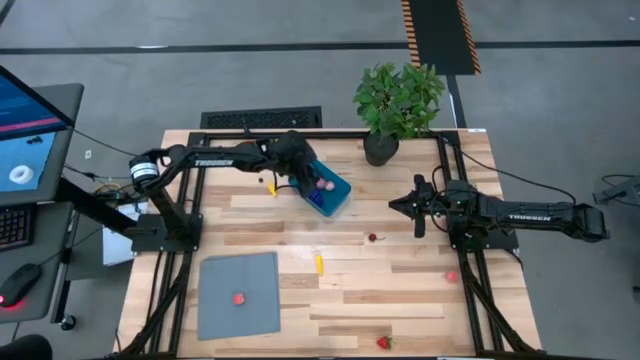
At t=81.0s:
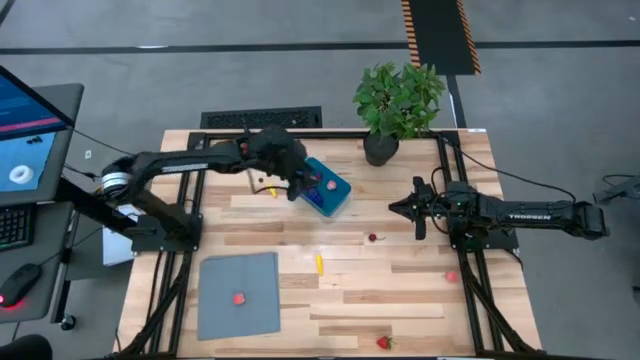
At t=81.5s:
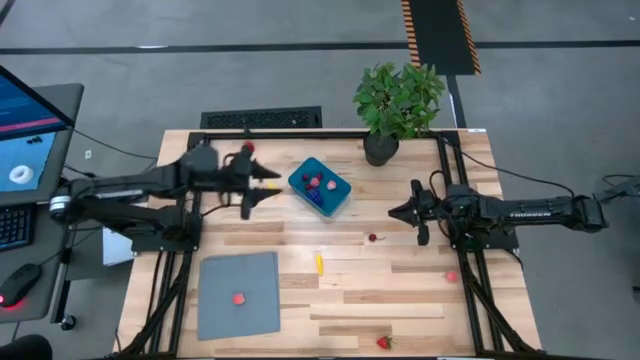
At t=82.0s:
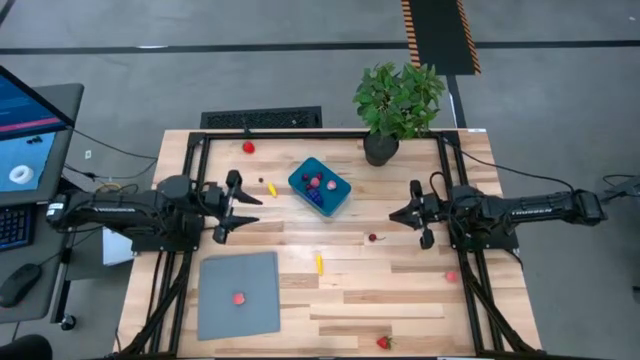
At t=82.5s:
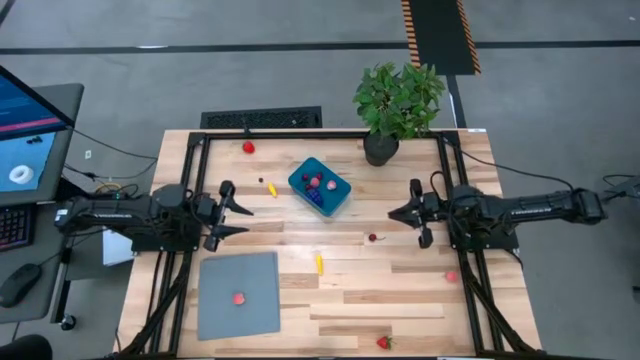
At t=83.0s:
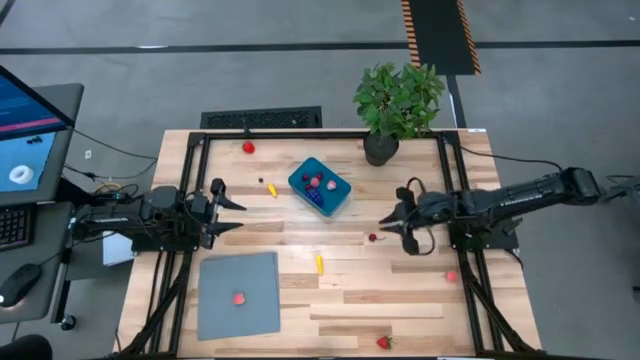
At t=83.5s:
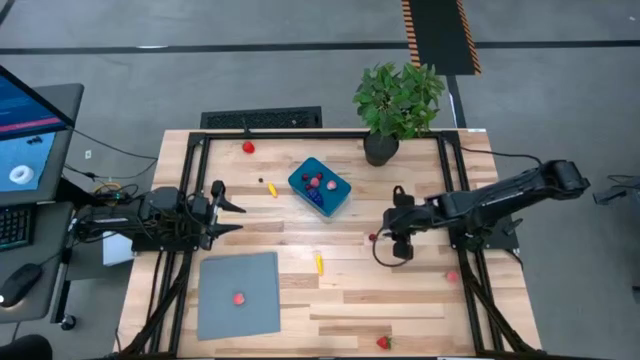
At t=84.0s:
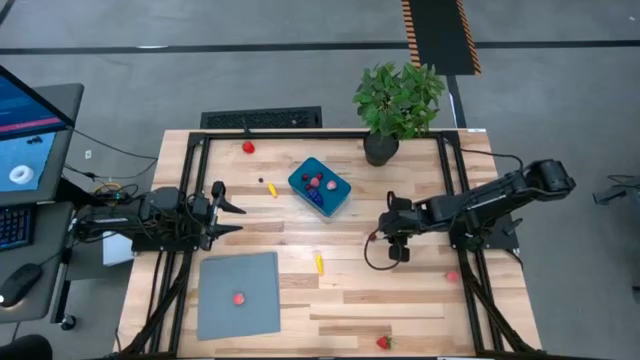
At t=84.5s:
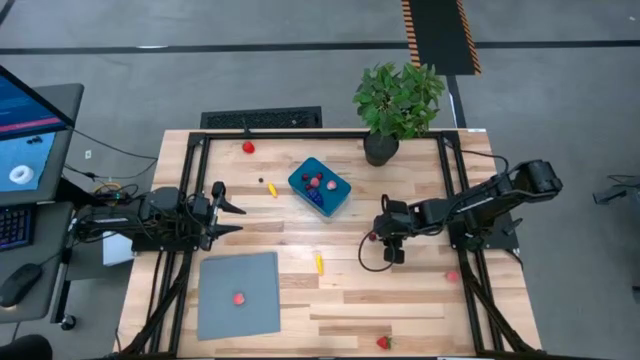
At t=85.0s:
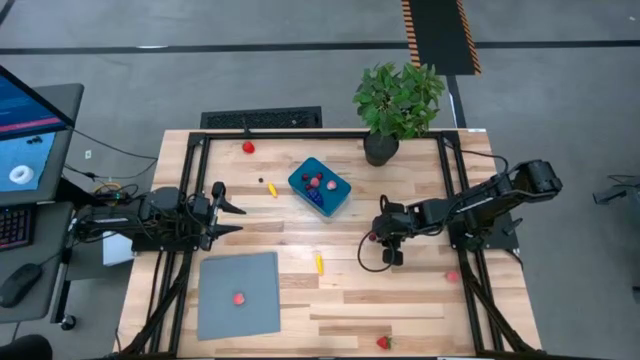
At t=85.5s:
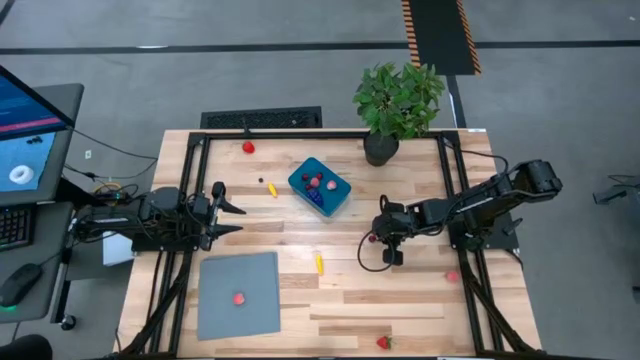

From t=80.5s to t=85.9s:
Task: Pick and placing Produce into tupperware
Put the cherry into the container

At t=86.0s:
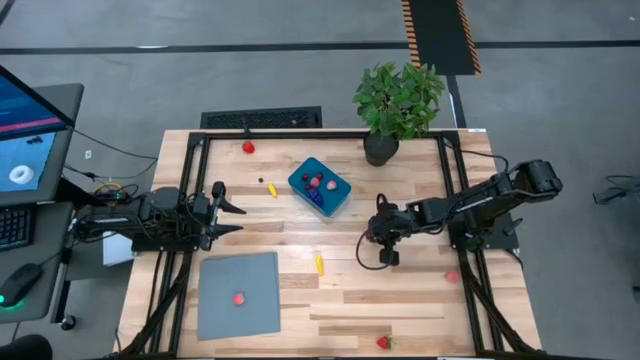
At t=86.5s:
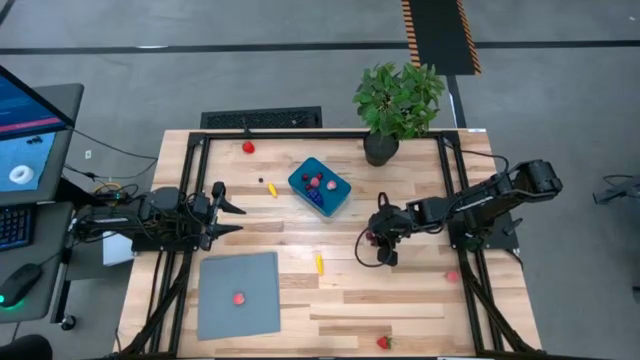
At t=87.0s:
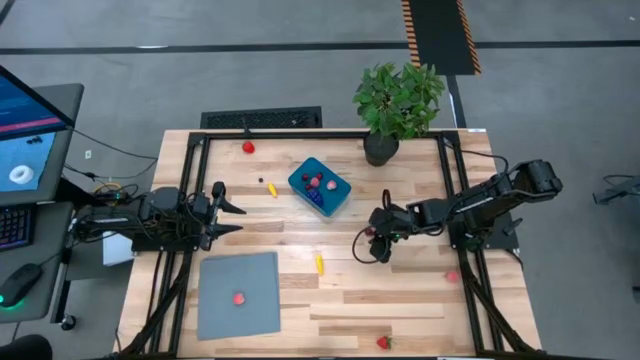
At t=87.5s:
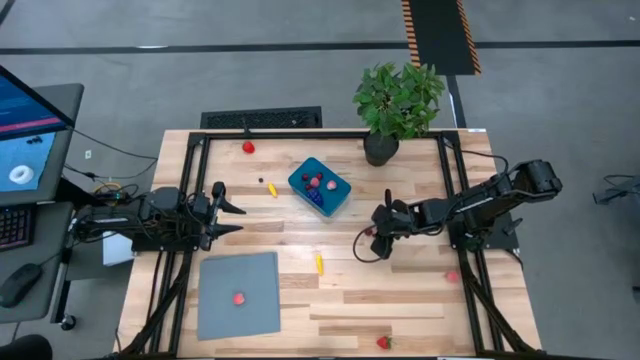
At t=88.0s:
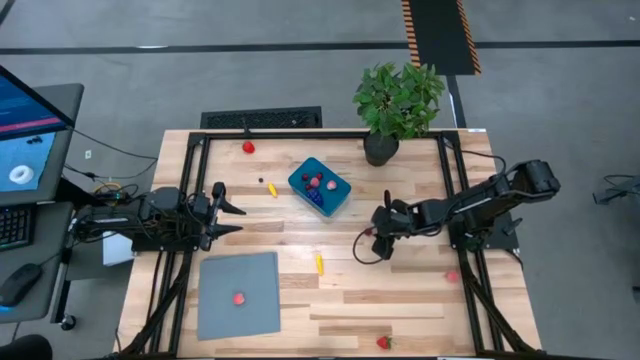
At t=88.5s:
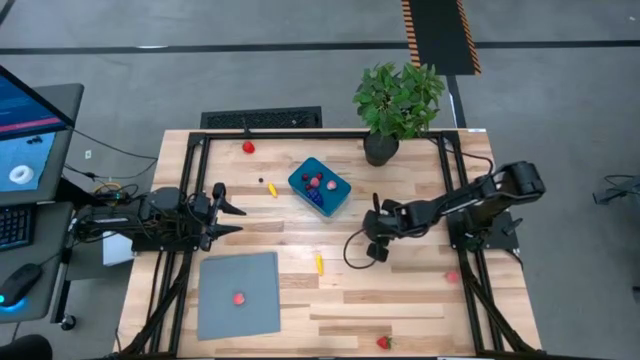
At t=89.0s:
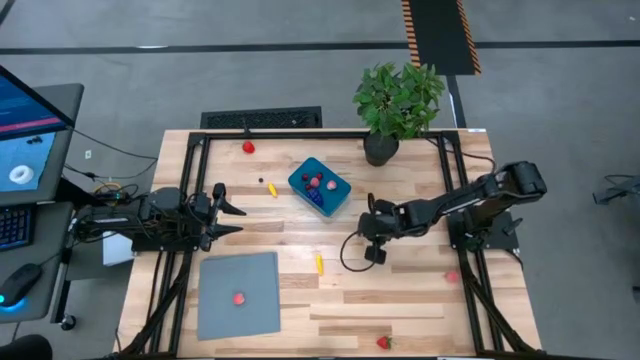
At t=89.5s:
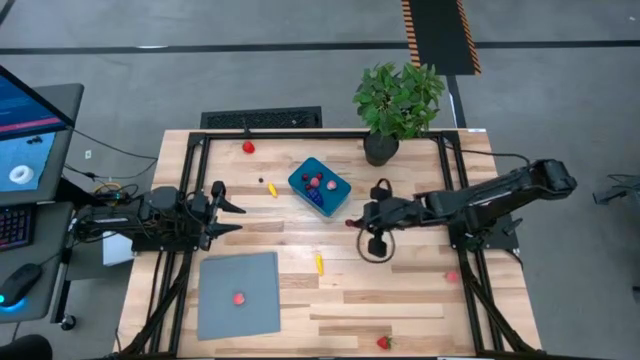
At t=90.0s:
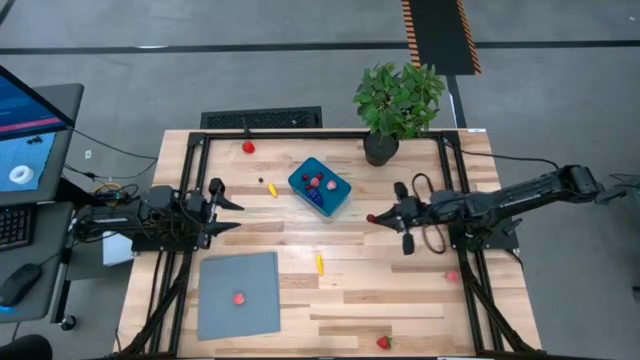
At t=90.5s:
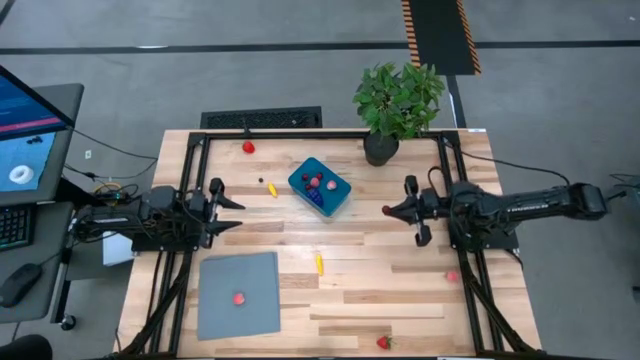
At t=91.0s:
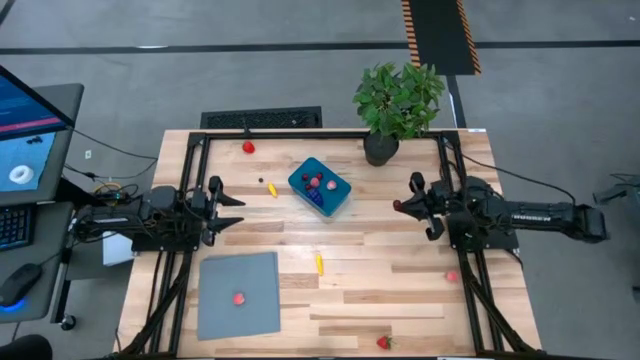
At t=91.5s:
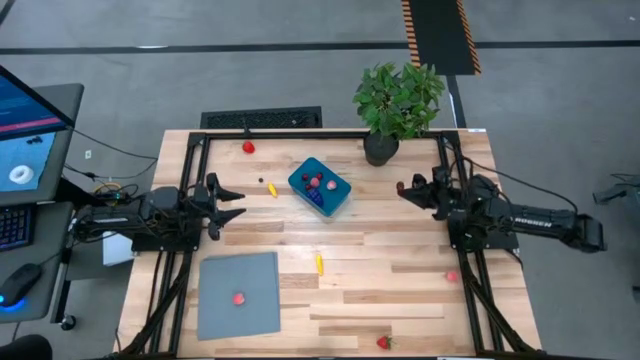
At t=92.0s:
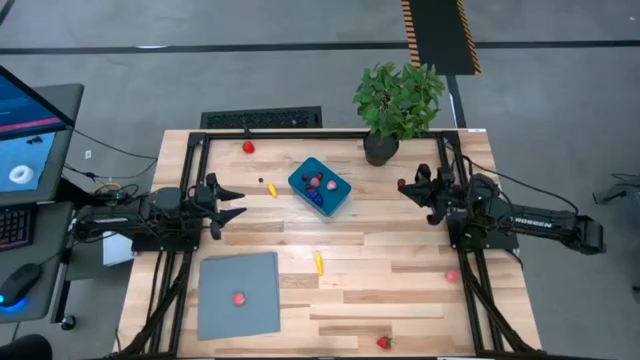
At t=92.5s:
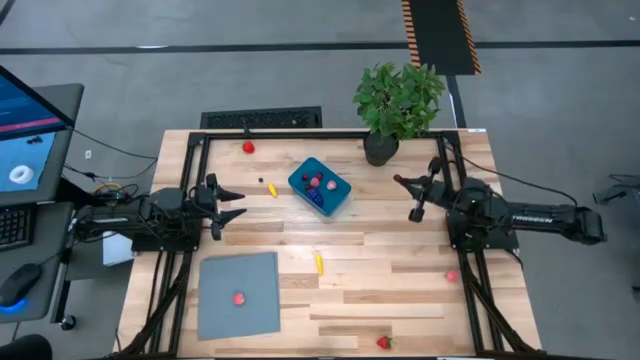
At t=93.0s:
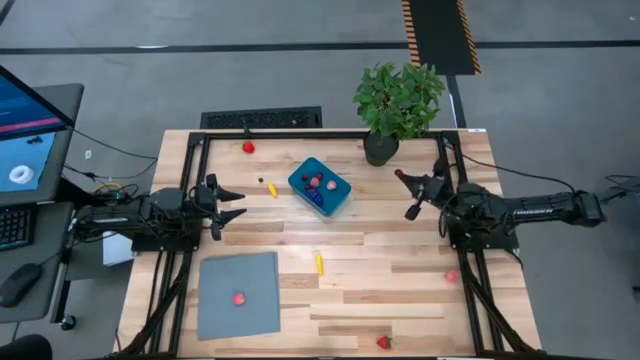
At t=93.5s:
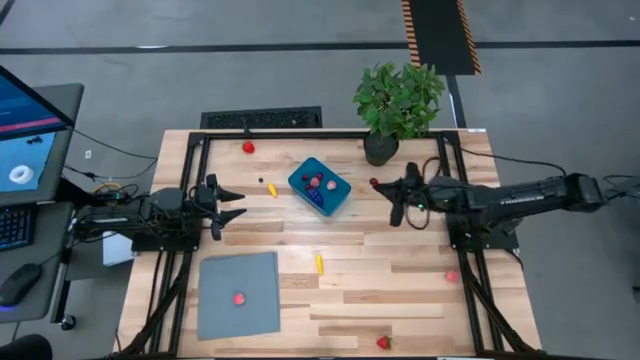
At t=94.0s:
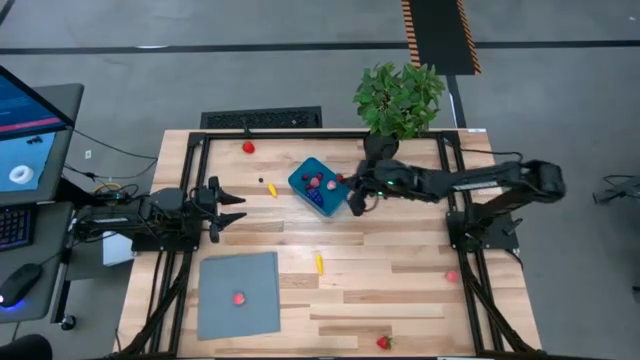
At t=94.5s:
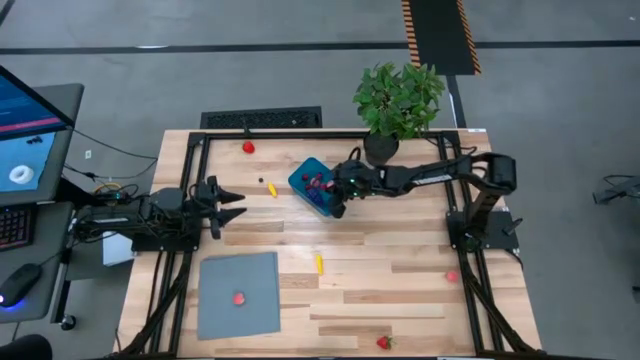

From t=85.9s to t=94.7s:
Put the cherry into the container

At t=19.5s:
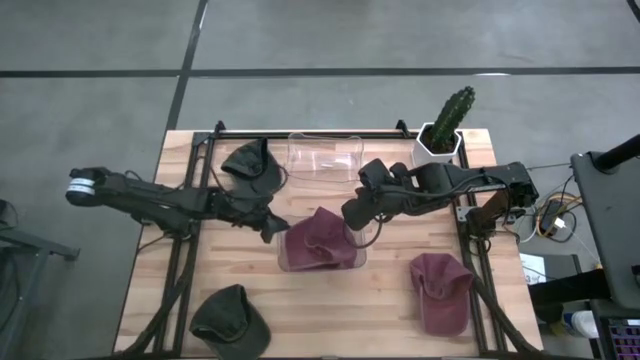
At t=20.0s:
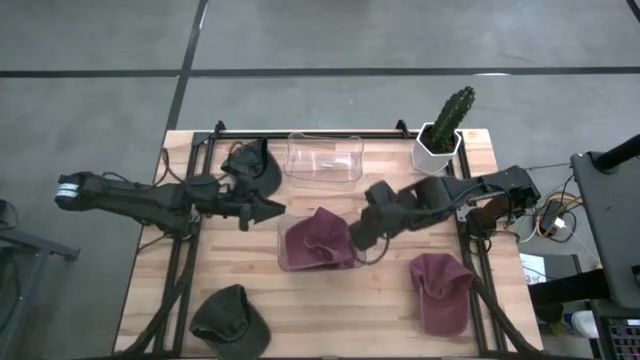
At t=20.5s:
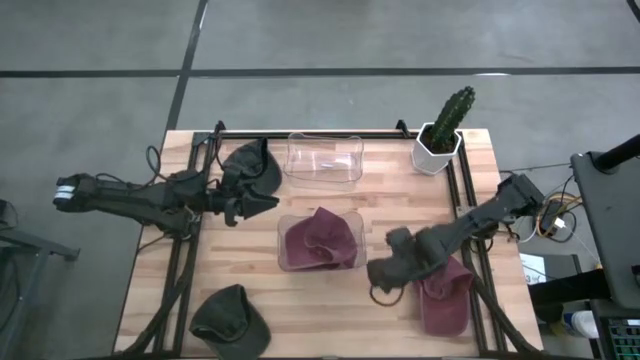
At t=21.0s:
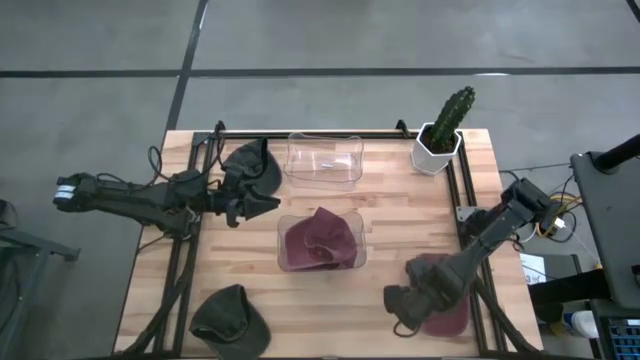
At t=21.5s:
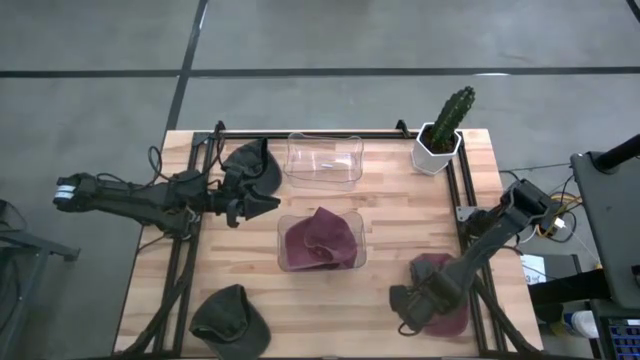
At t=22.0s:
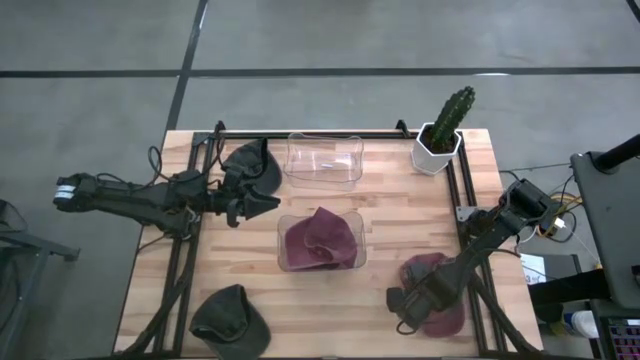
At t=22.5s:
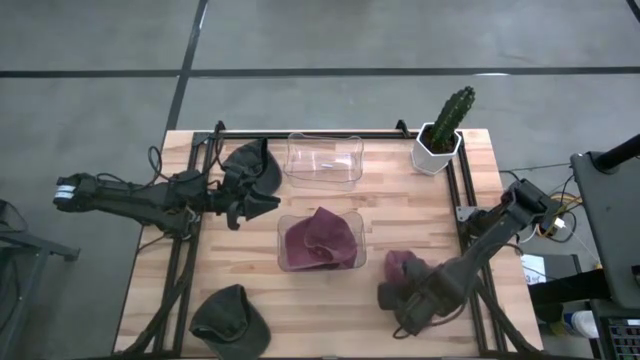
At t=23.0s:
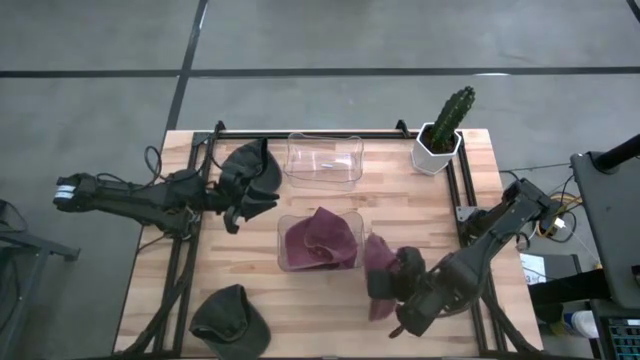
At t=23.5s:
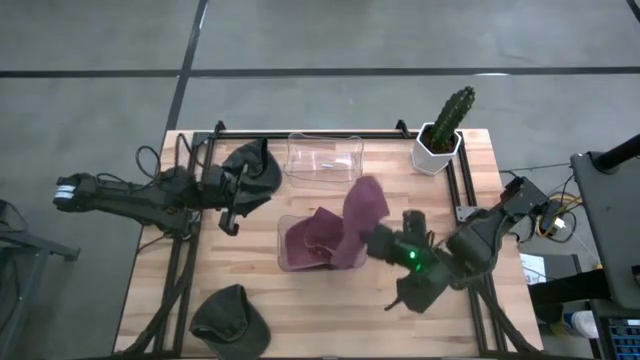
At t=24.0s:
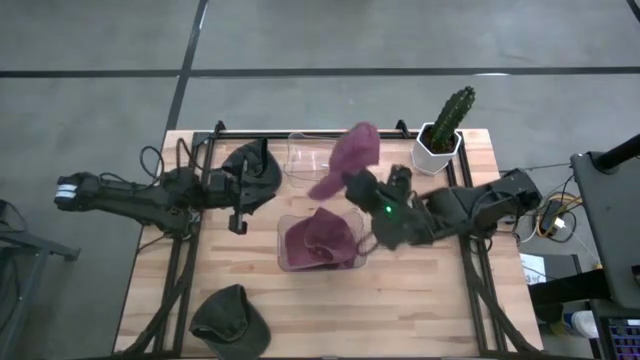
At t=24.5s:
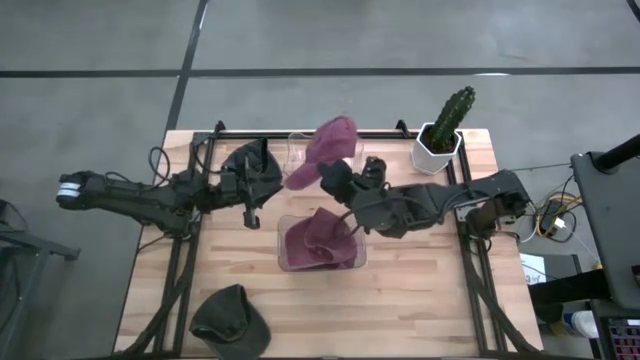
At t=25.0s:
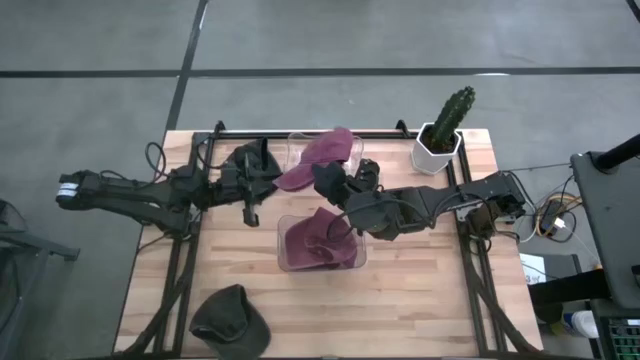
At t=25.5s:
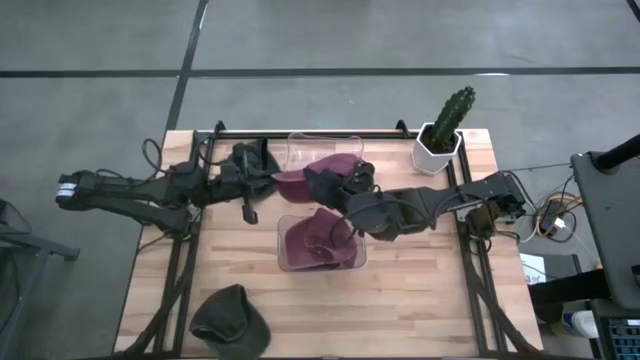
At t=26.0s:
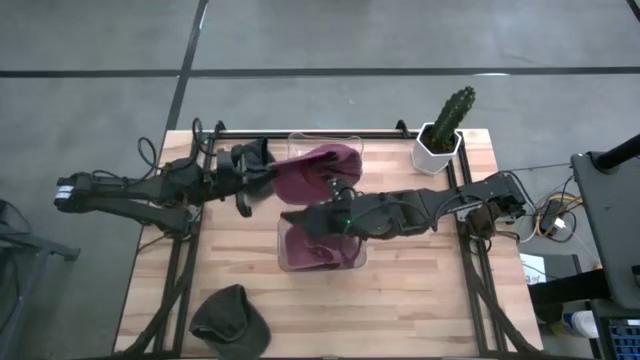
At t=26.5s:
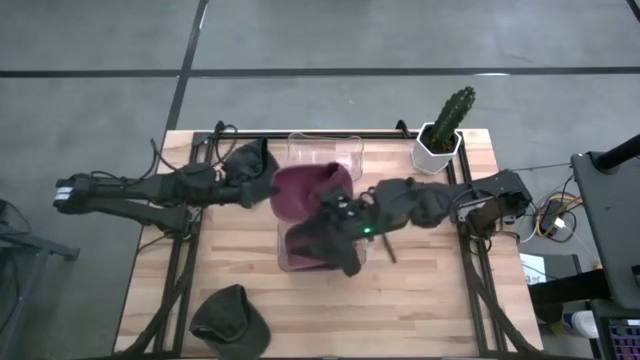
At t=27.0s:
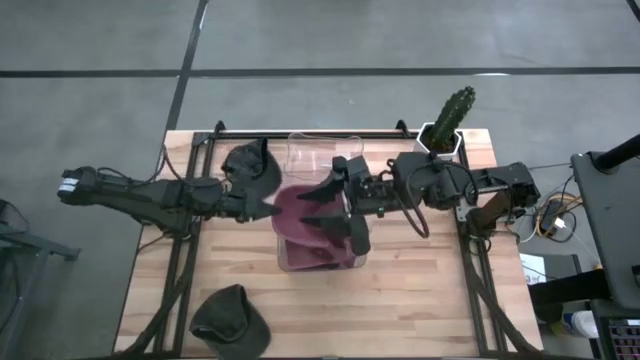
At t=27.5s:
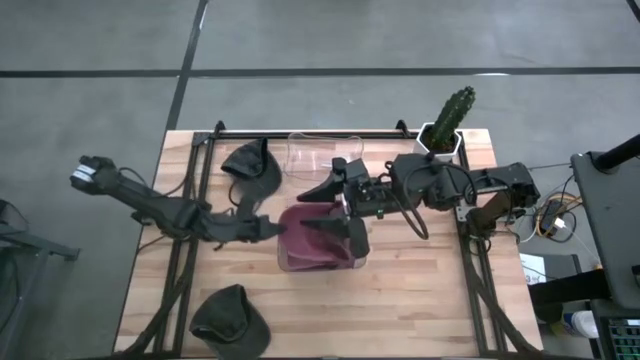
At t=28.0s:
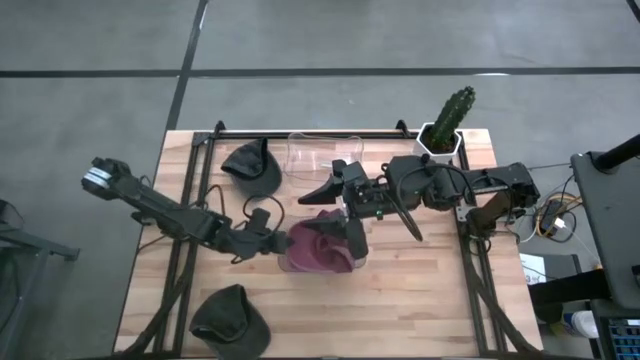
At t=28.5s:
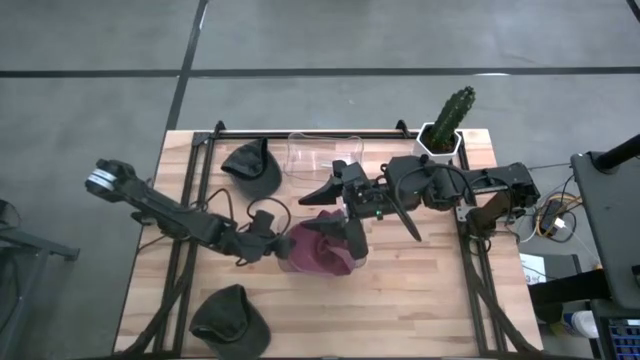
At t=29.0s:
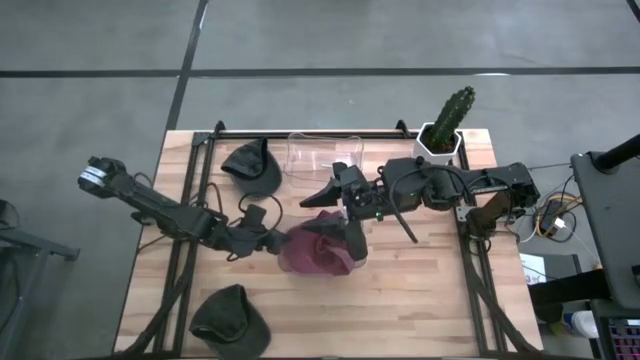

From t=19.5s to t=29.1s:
Task: Pick & Place hat
Put the red cap into the bottom transparent bin
